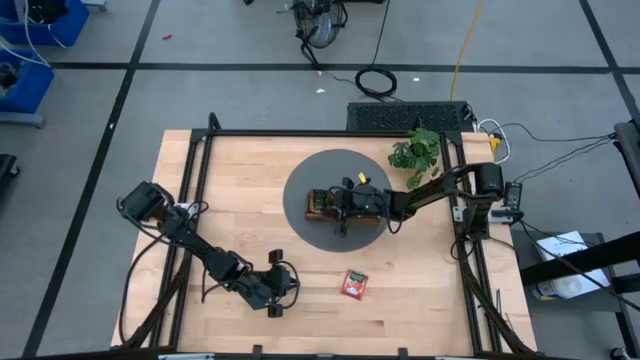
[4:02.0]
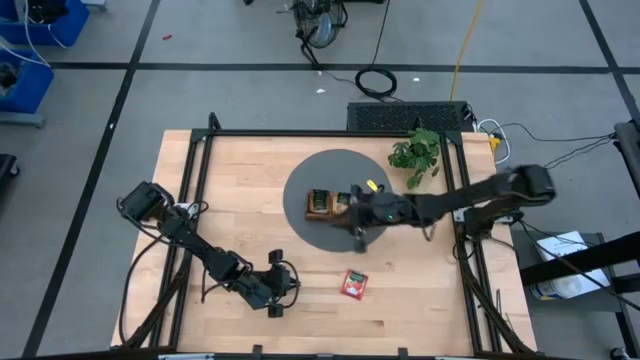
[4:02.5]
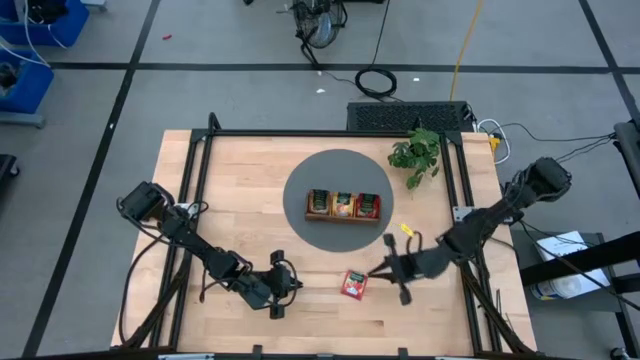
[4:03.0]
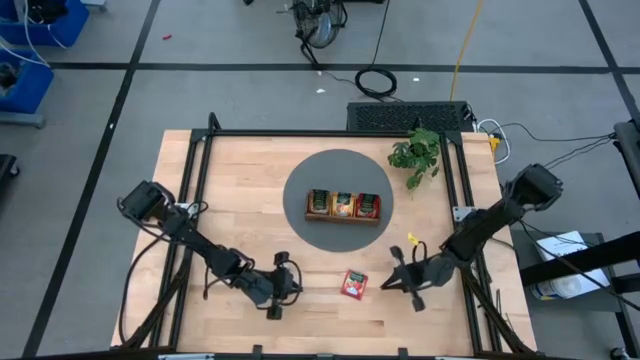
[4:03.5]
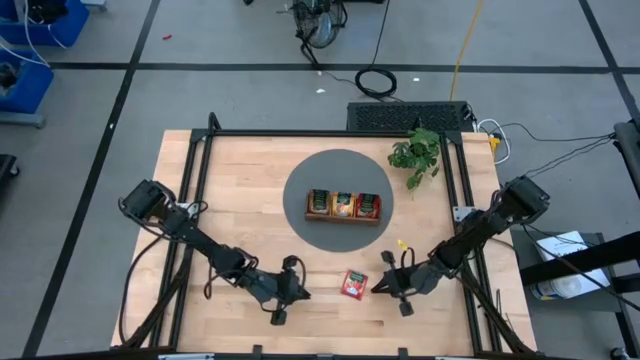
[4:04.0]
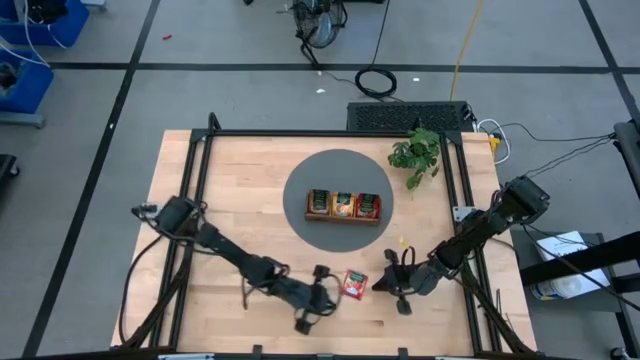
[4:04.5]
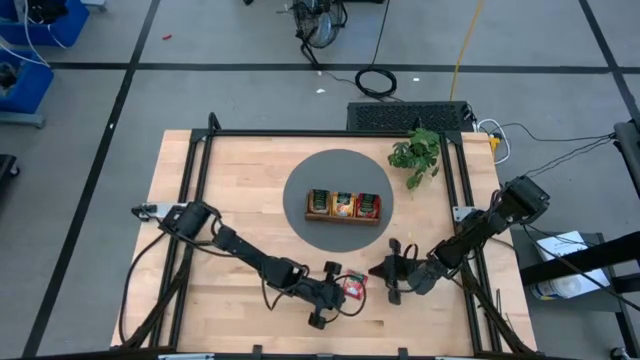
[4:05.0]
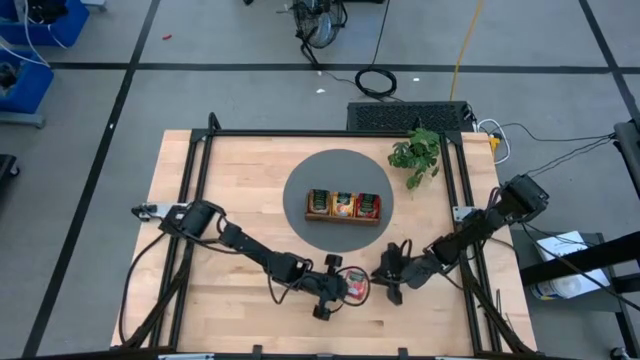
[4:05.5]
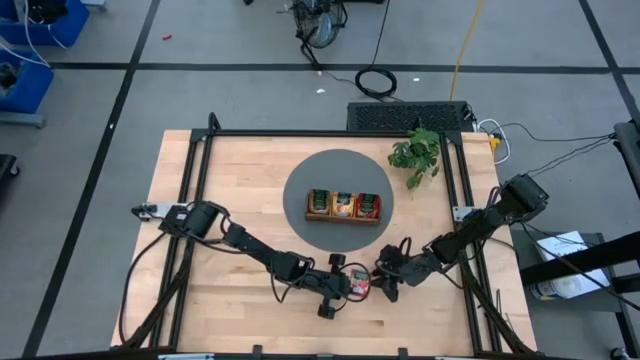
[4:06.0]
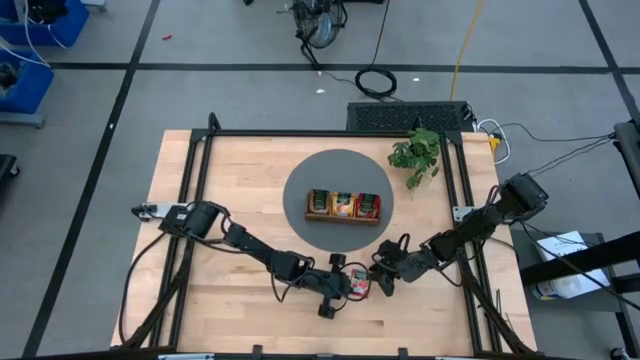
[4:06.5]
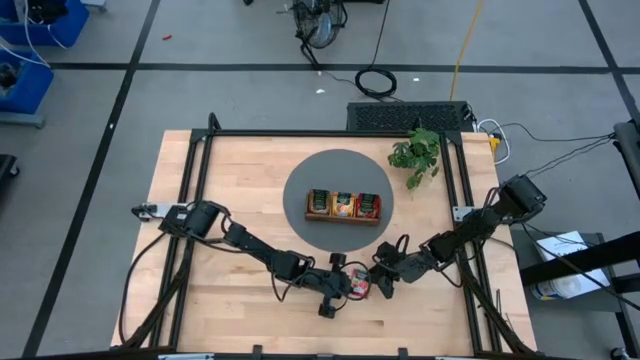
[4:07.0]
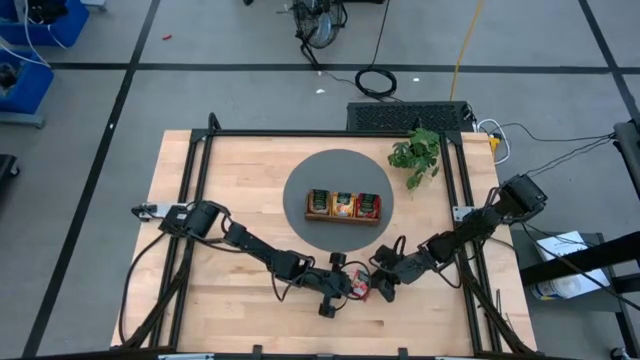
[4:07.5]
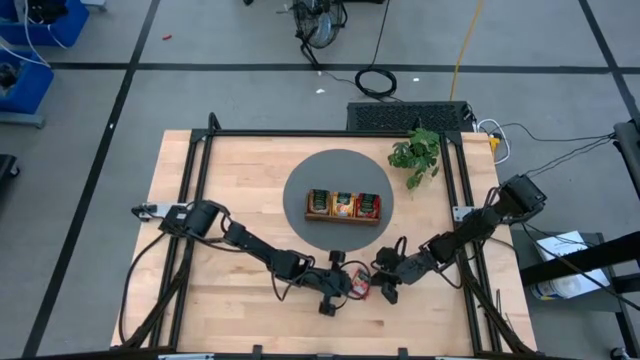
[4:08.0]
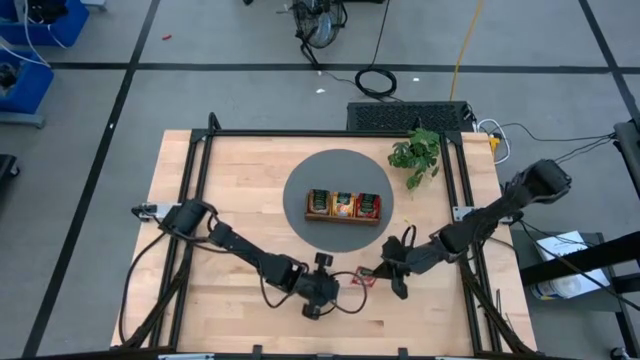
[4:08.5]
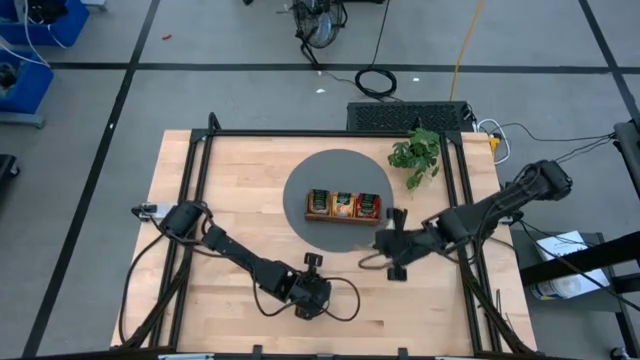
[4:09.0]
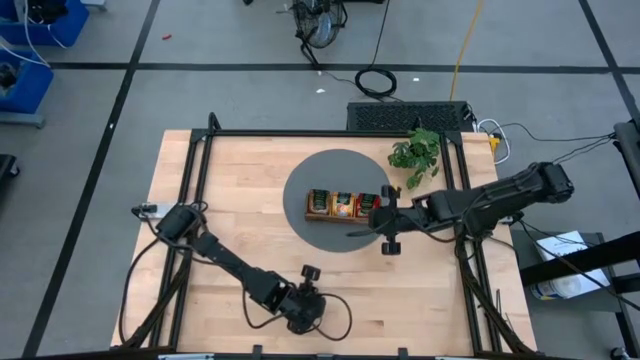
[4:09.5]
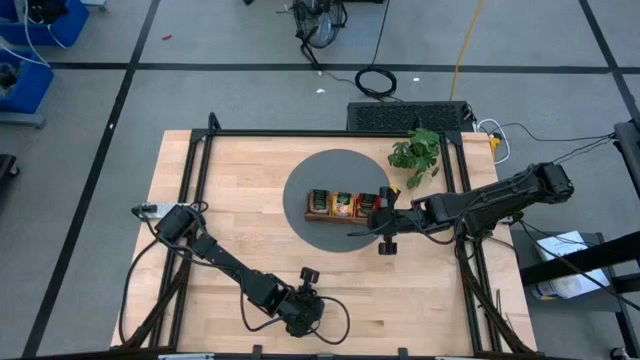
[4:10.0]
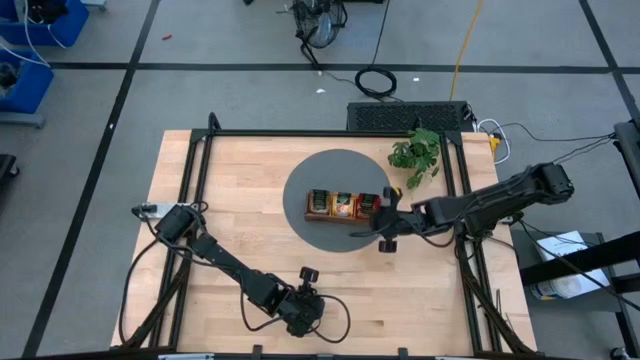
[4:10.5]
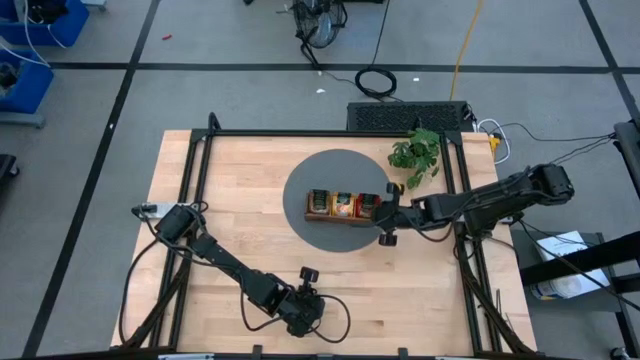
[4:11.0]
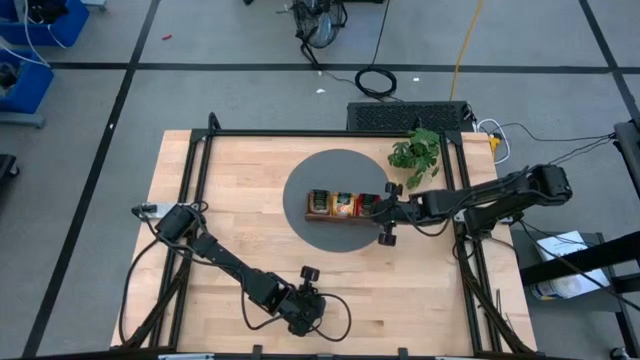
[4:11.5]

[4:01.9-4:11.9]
Task: Pick & Place Tea
Put the red tea bag into the right slot of the wooden organizer

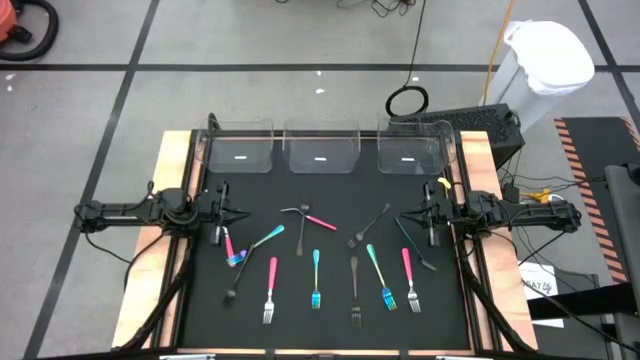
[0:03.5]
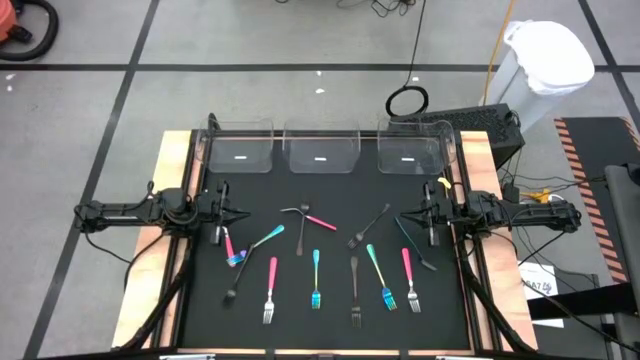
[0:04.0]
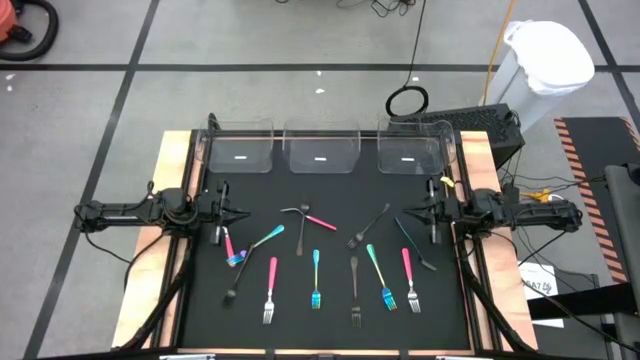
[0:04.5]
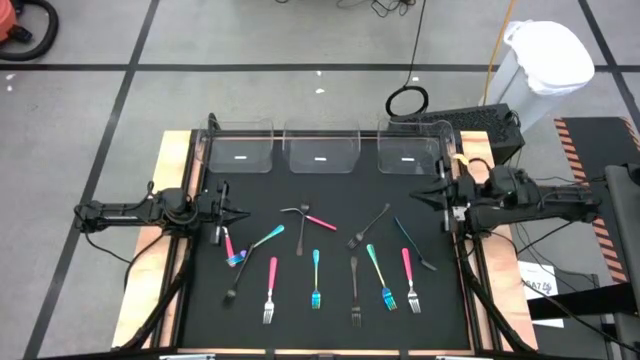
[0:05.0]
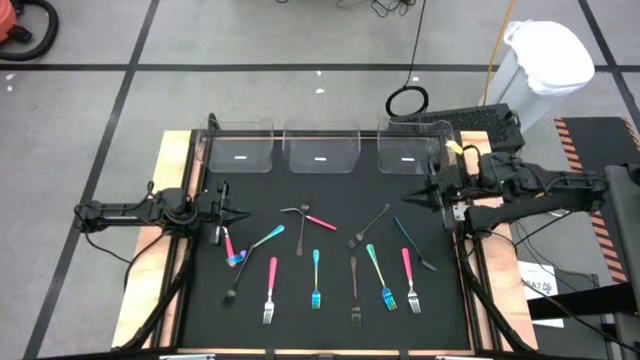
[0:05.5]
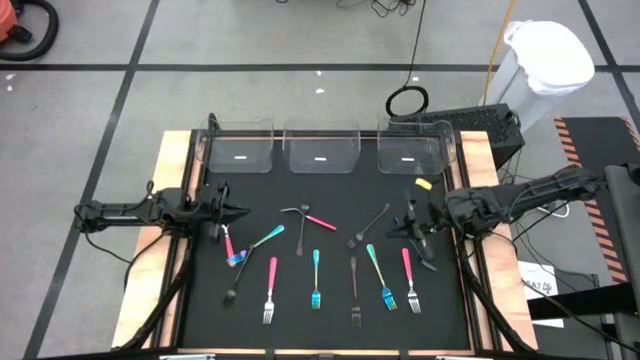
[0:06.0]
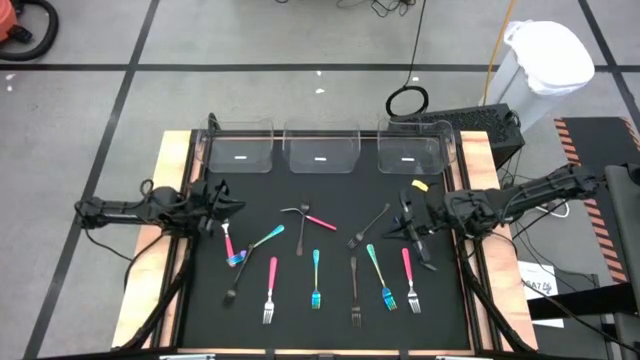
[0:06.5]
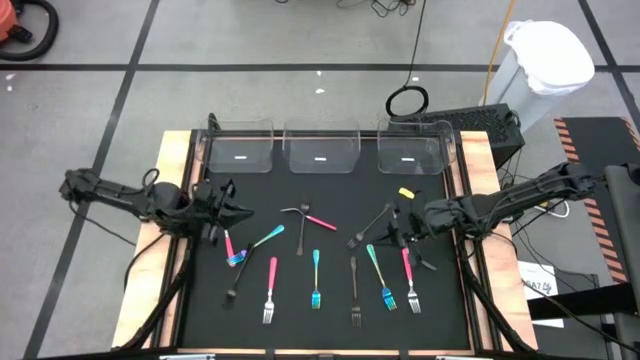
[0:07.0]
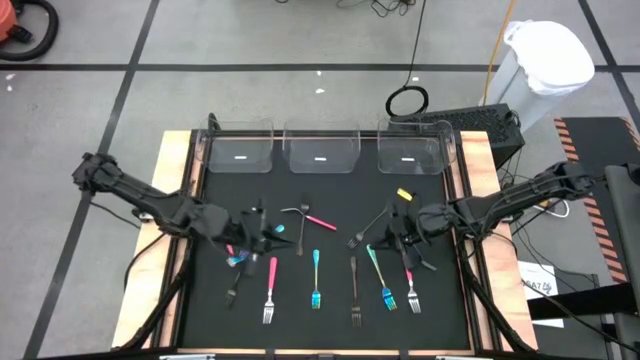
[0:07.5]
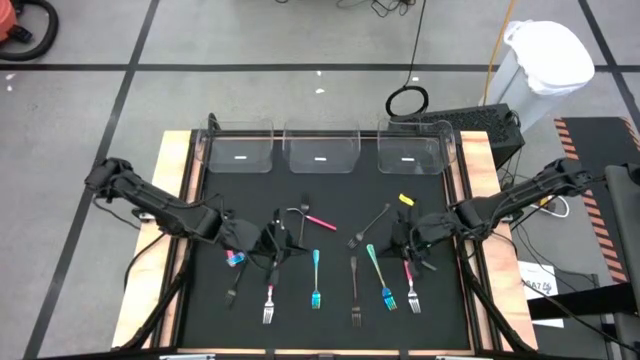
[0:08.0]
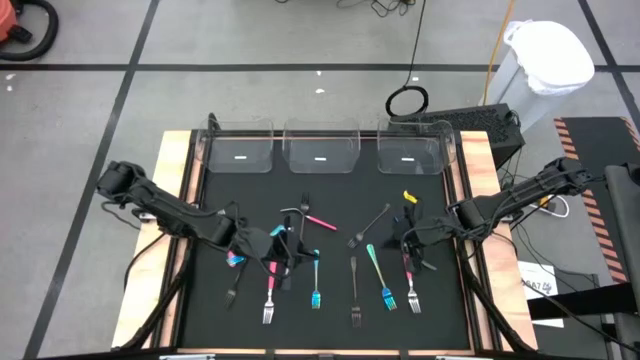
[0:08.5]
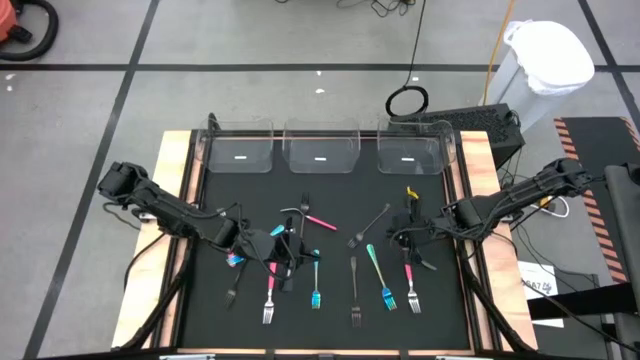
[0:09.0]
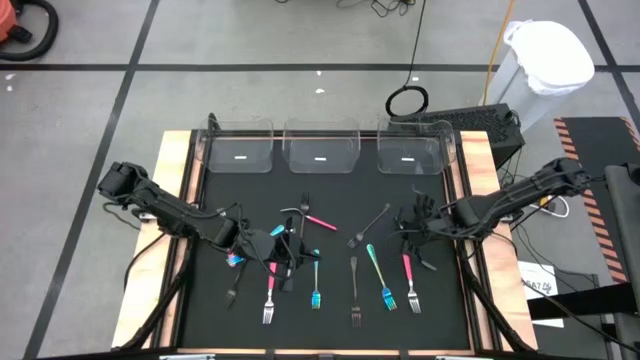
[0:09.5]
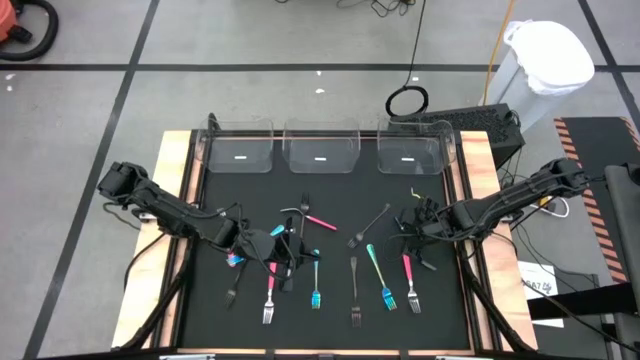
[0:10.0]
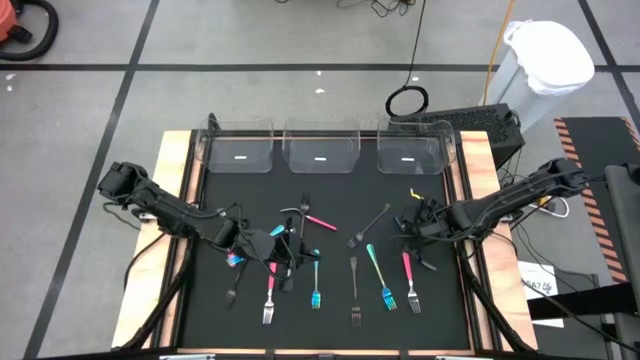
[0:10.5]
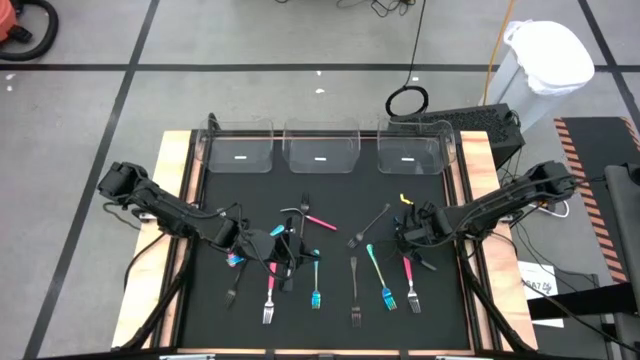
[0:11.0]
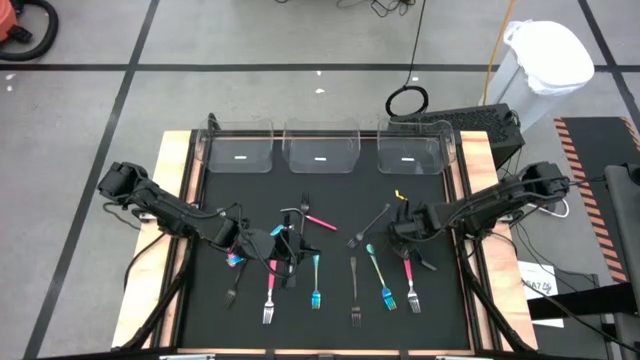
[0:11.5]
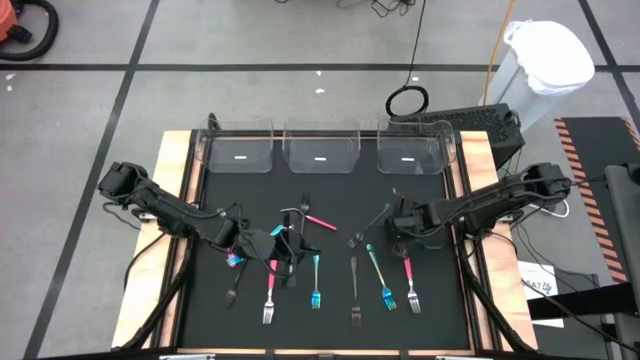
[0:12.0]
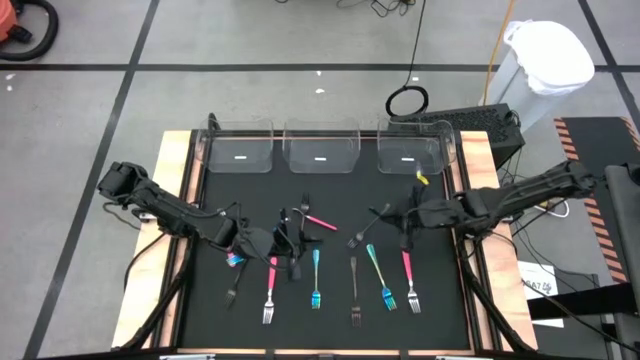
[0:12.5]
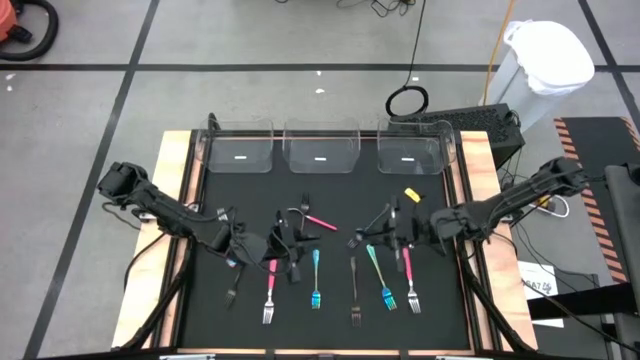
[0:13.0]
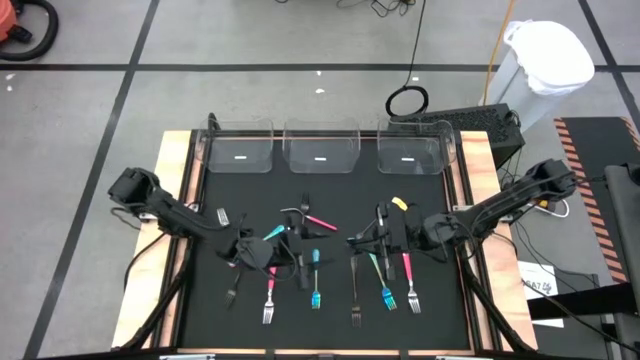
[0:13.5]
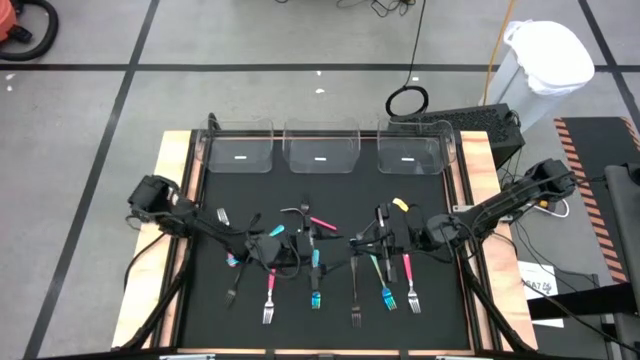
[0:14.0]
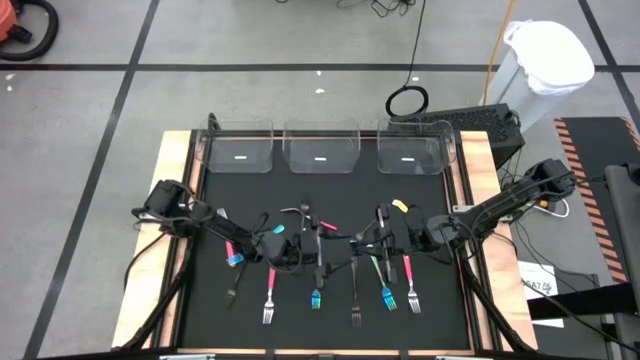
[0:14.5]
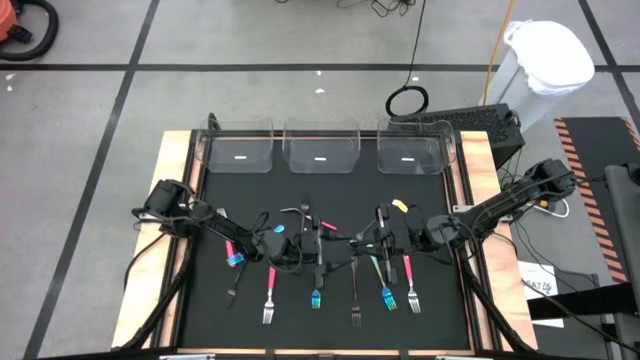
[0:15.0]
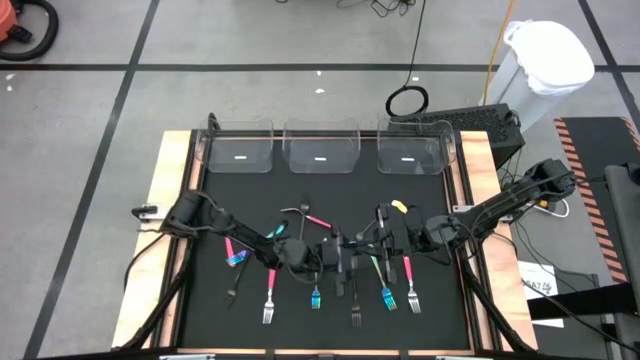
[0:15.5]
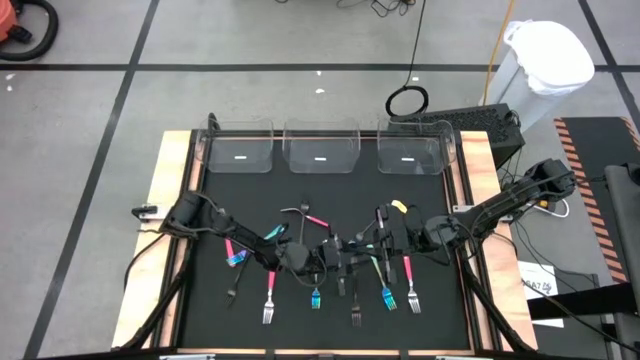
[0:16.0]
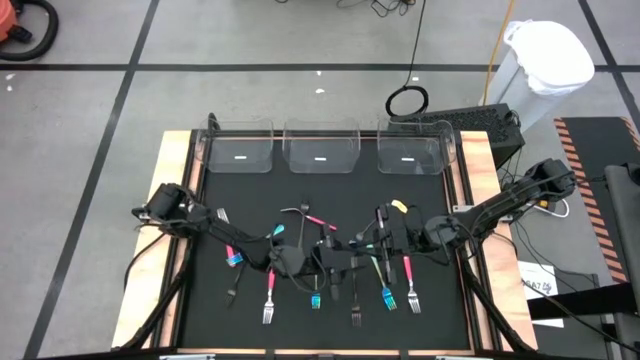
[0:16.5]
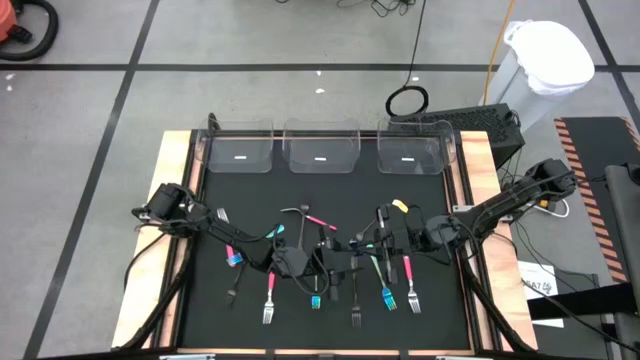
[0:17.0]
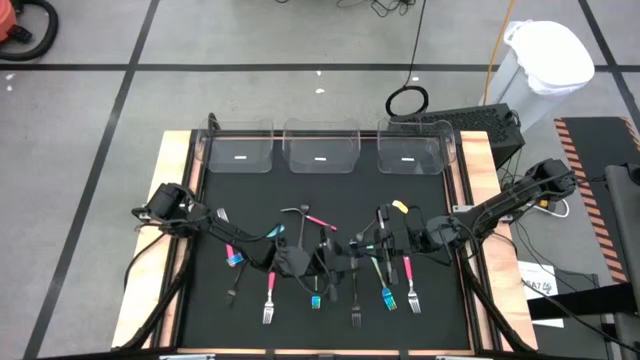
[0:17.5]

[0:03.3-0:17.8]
Task: Sort silverware by color (type)
Put the blue fork into the right transparent bin
